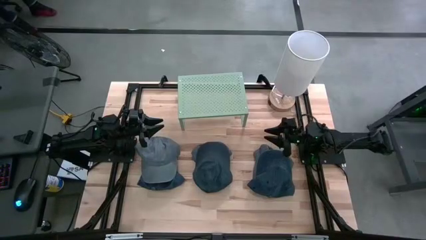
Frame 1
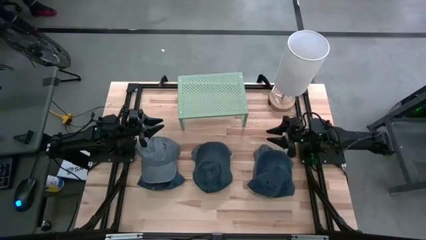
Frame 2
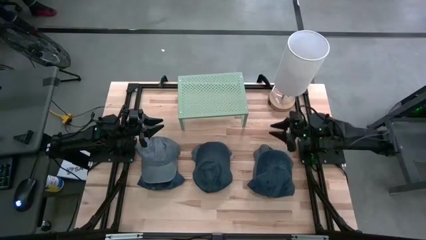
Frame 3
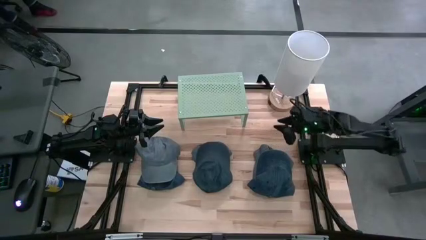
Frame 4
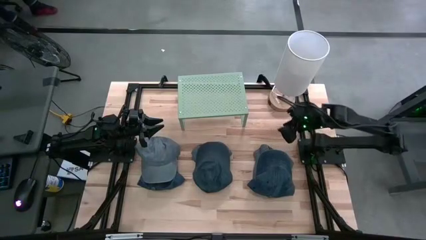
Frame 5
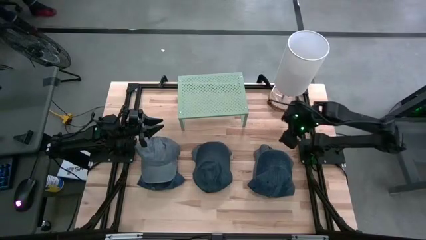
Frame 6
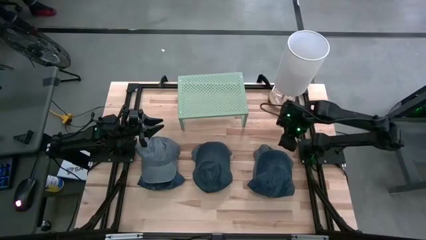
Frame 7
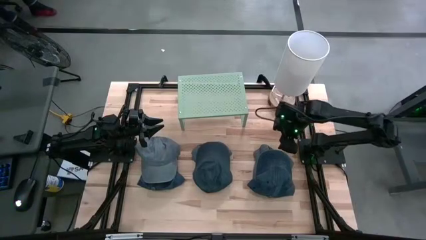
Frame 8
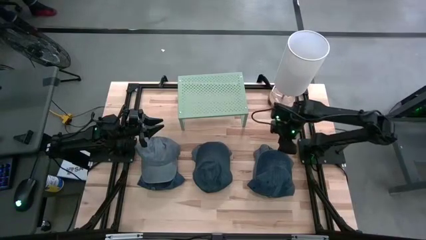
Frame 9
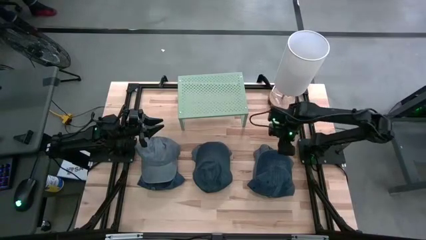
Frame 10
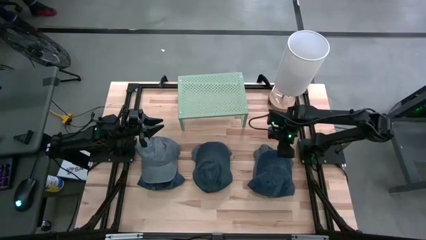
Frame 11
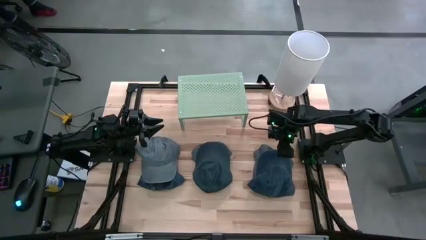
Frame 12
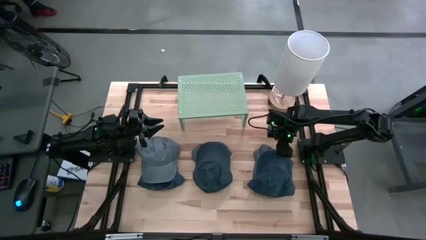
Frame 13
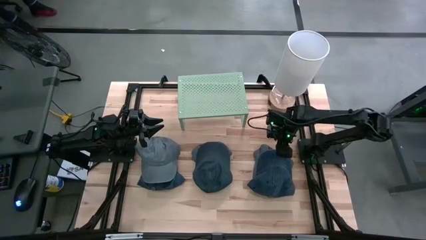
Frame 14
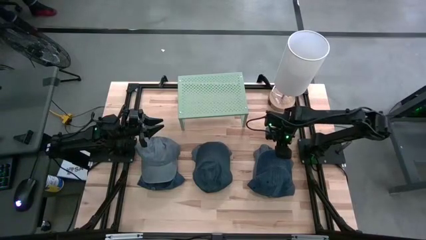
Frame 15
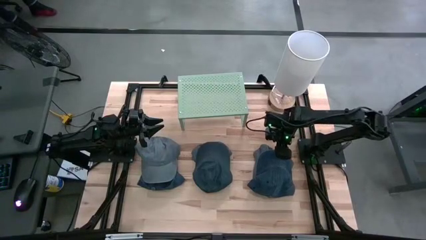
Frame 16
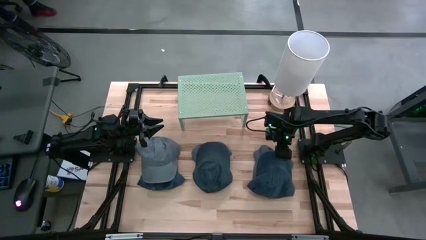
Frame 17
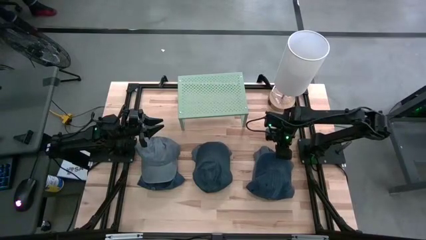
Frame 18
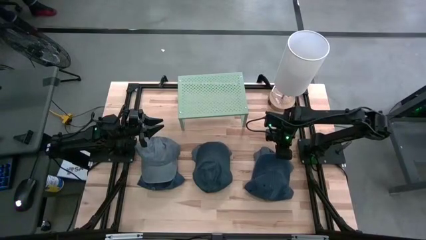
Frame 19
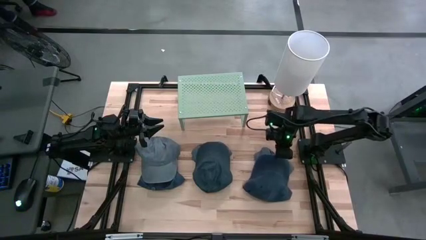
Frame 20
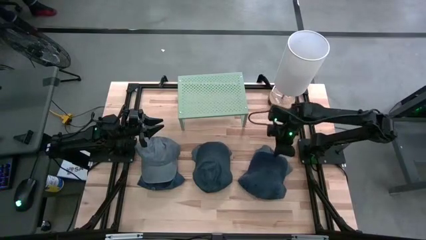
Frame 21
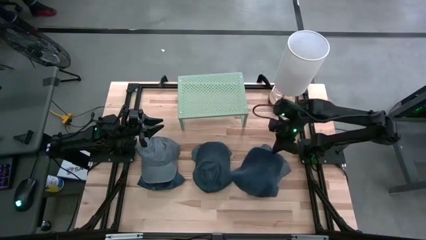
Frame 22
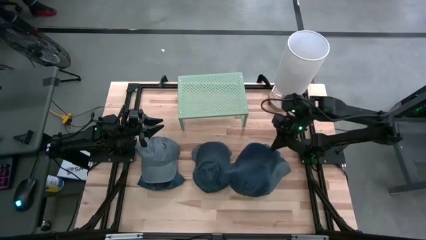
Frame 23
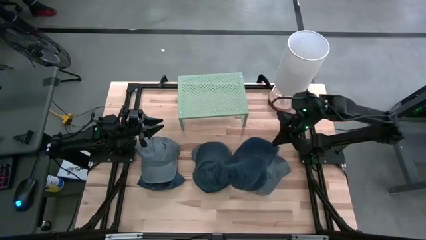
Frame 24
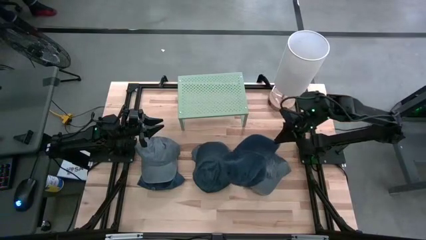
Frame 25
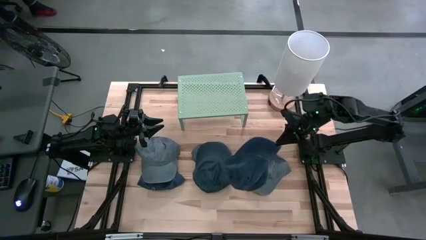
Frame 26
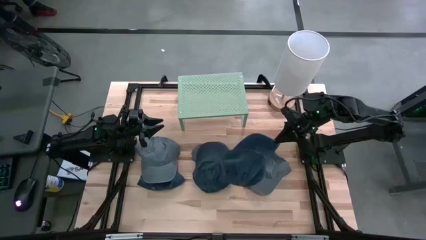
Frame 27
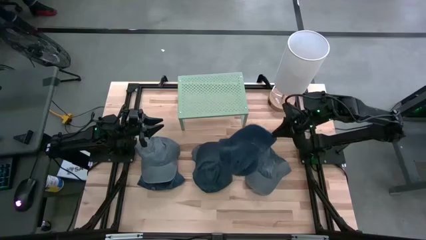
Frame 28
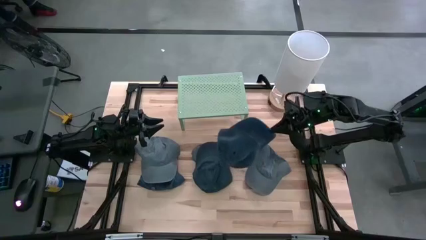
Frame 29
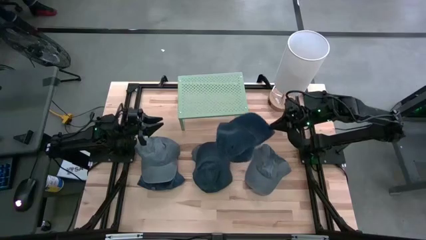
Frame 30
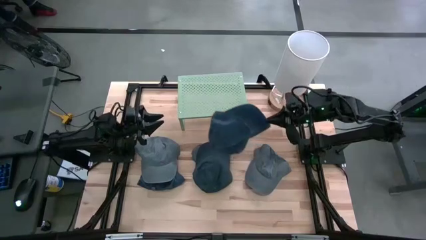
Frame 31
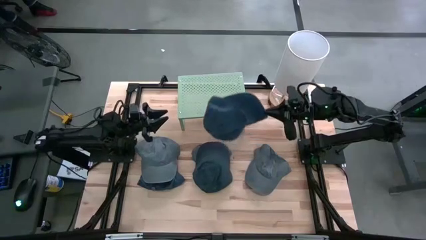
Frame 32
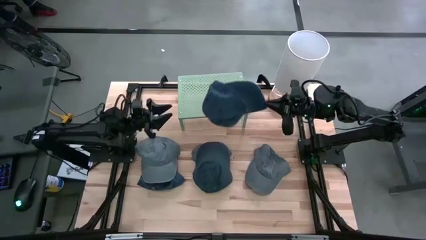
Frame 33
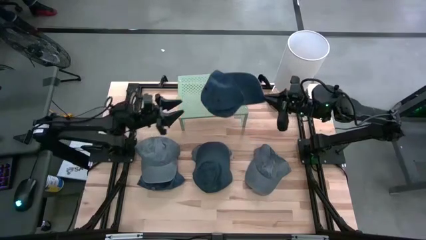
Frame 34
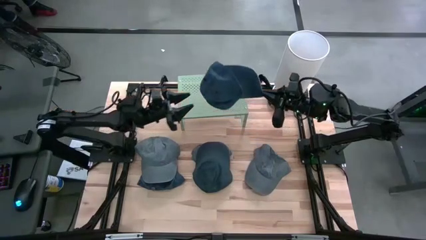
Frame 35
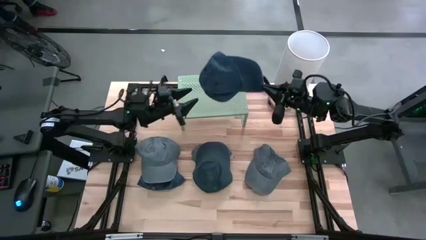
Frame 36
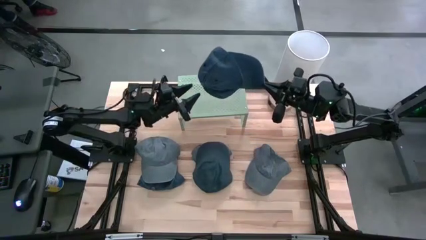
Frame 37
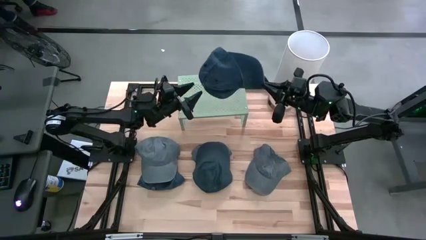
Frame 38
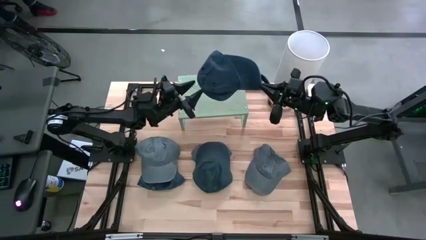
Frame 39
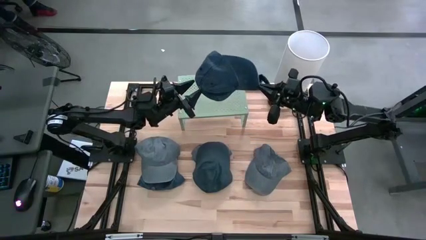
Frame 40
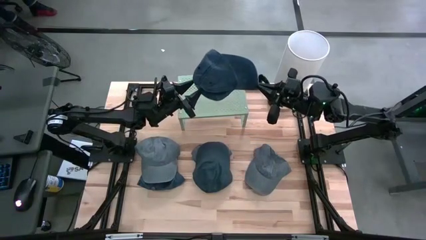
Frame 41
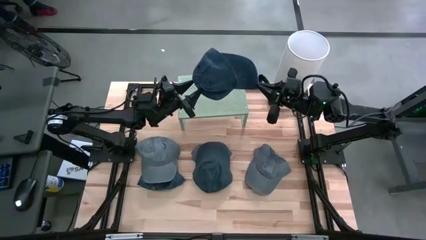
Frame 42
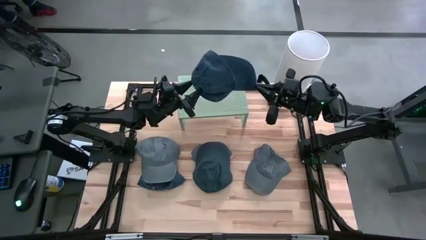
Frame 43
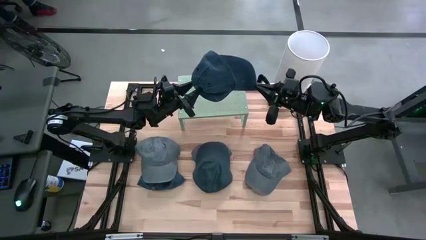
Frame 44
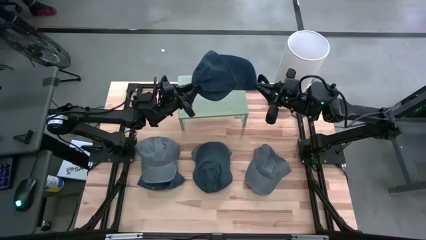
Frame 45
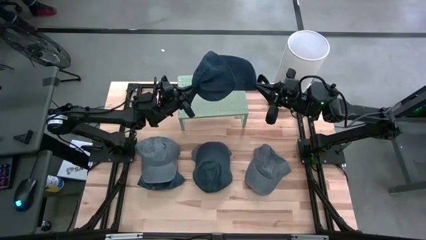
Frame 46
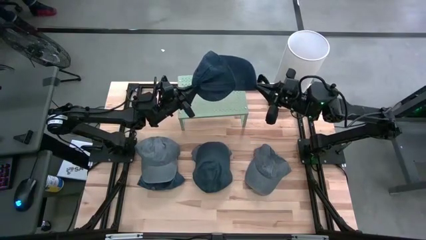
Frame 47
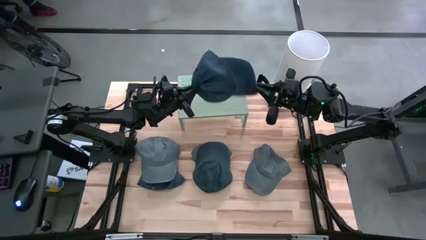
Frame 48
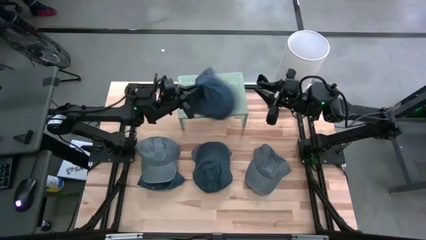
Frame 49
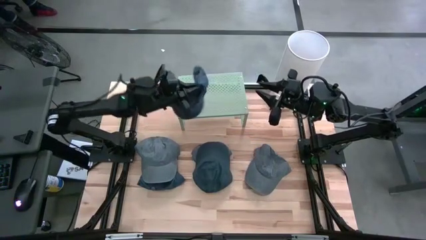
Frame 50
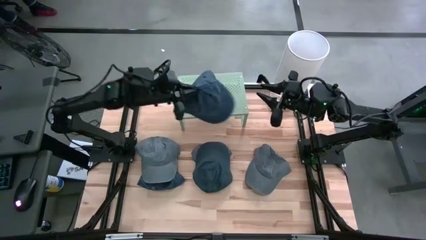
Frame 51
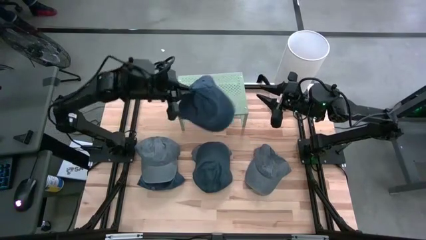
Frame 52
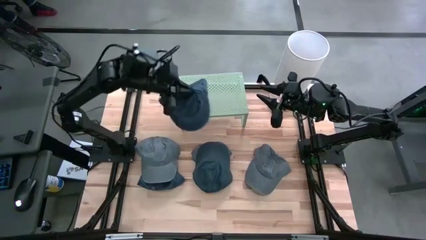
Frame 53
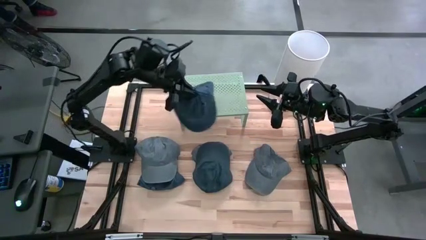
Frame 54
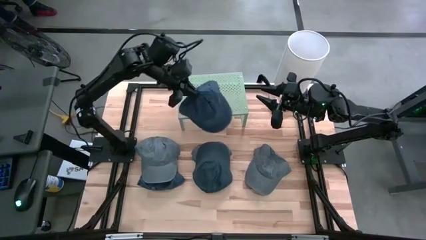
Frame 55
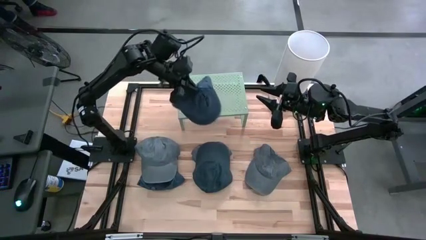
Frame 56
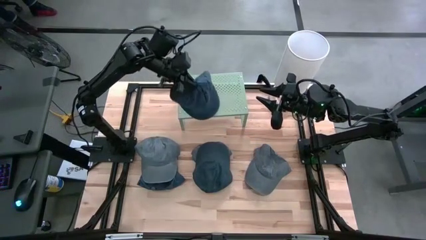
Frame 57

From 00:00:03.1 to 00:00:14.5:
Task: Pick & Place hat
Put the right blue cap on the shelf
